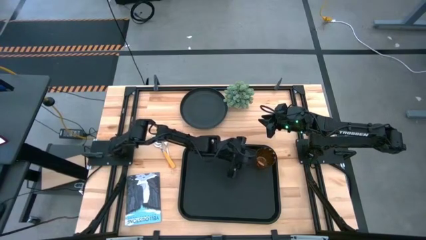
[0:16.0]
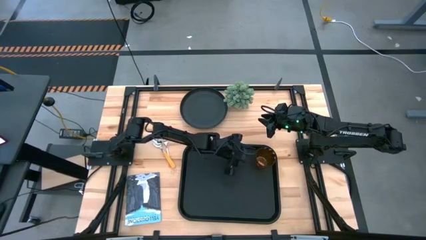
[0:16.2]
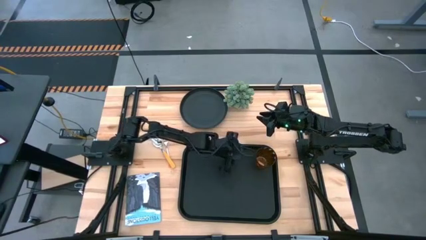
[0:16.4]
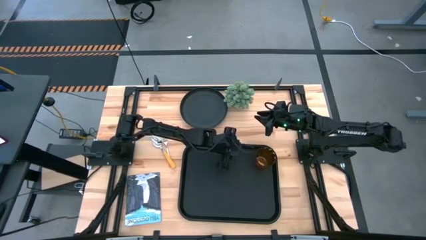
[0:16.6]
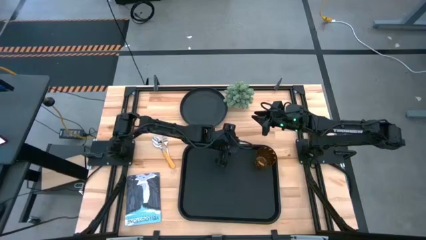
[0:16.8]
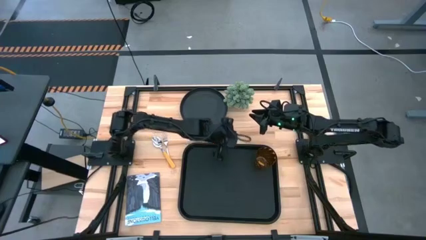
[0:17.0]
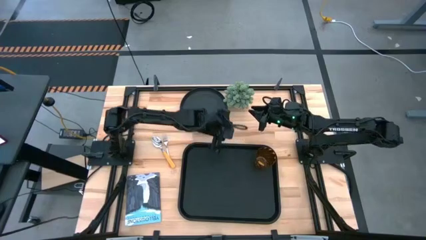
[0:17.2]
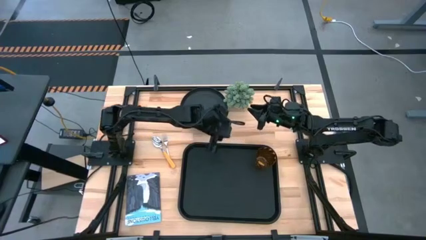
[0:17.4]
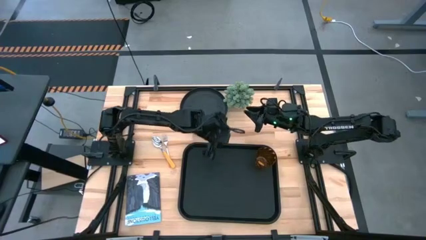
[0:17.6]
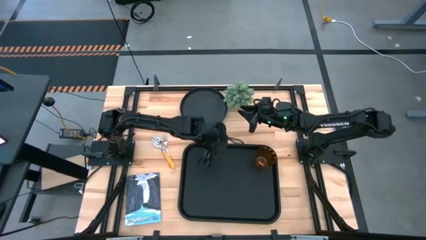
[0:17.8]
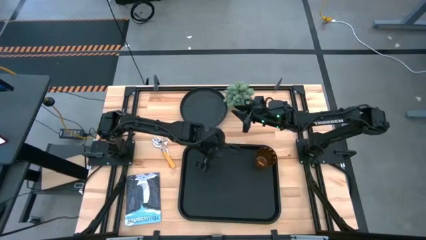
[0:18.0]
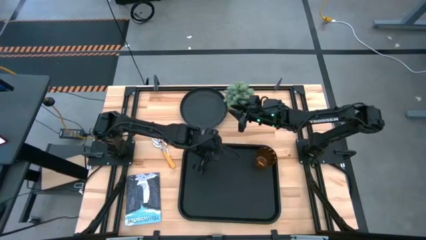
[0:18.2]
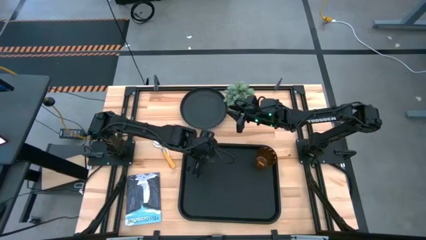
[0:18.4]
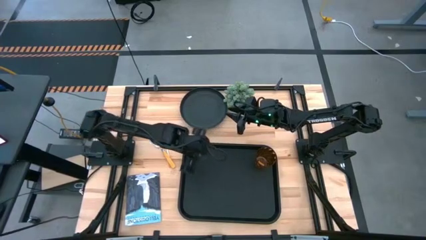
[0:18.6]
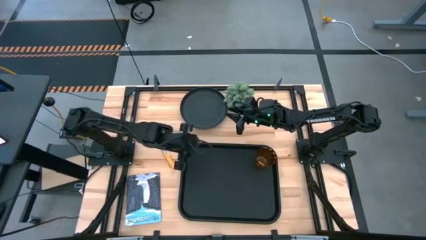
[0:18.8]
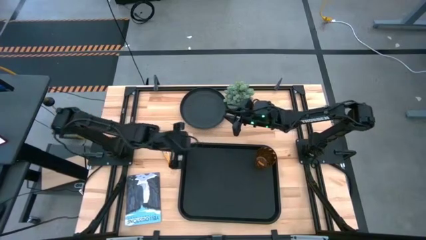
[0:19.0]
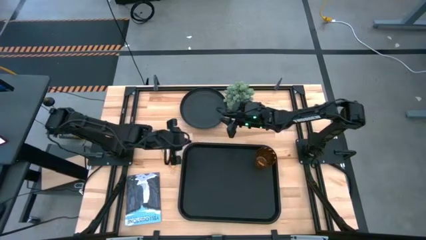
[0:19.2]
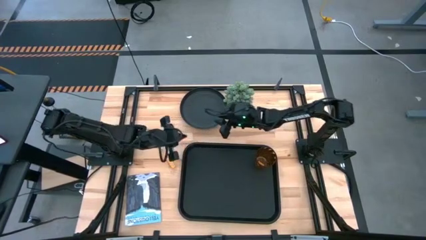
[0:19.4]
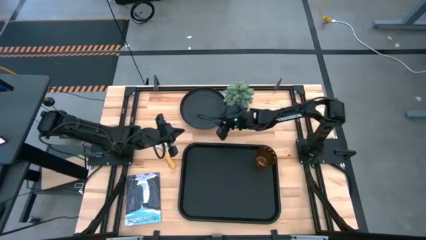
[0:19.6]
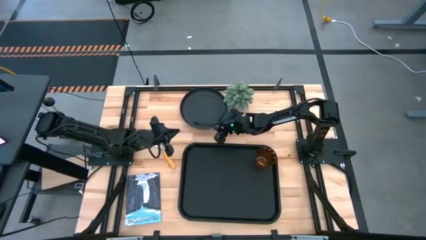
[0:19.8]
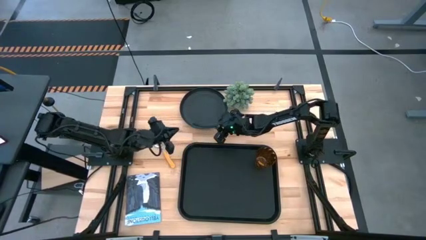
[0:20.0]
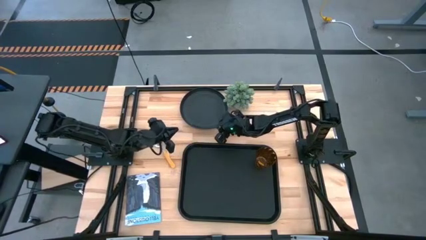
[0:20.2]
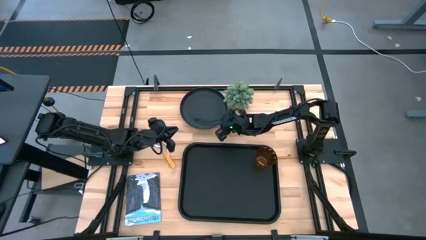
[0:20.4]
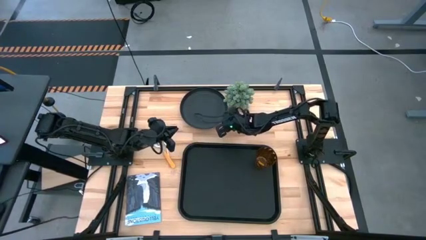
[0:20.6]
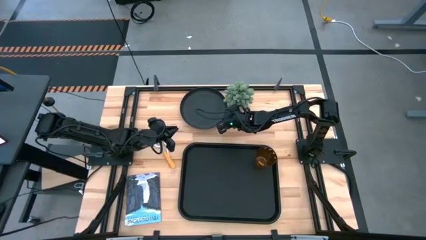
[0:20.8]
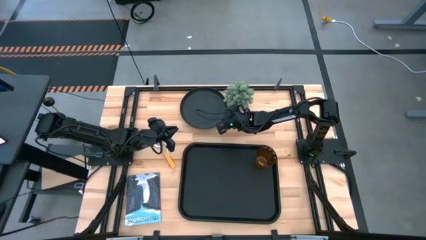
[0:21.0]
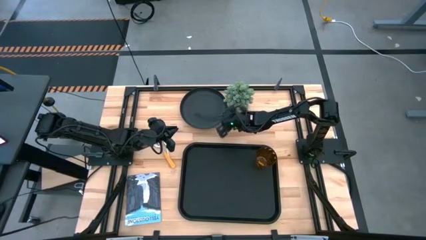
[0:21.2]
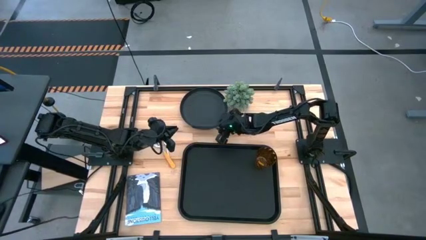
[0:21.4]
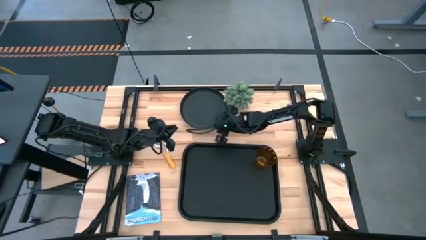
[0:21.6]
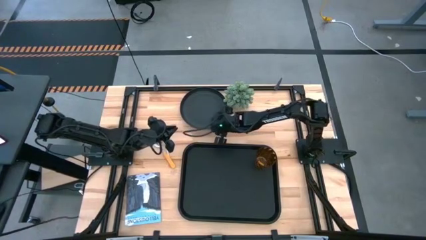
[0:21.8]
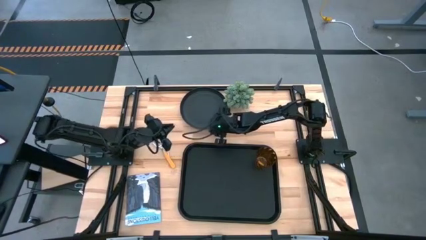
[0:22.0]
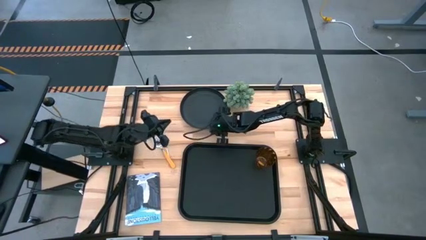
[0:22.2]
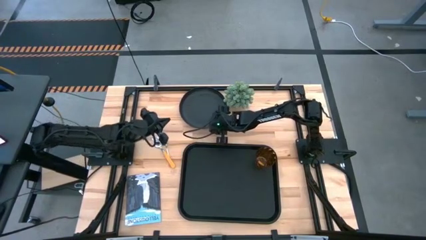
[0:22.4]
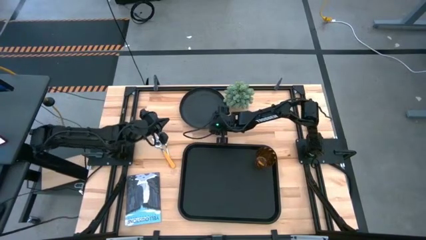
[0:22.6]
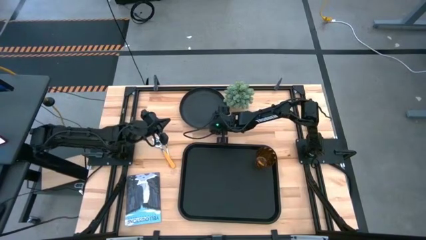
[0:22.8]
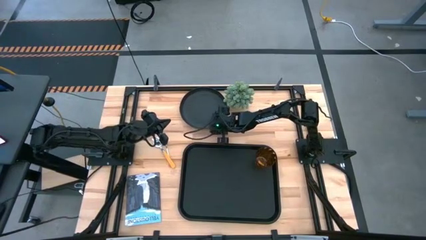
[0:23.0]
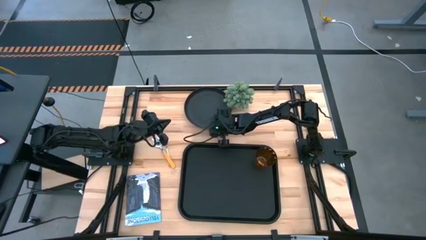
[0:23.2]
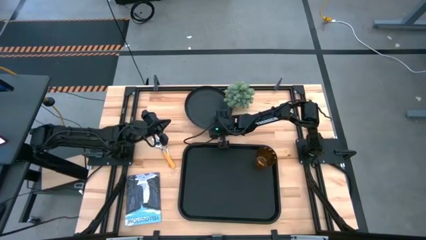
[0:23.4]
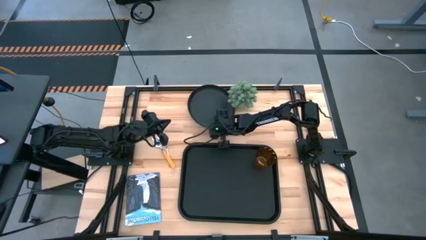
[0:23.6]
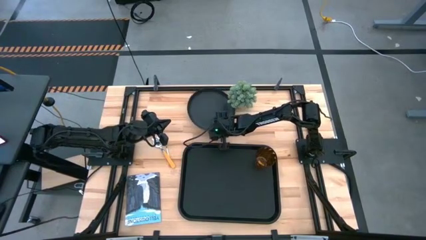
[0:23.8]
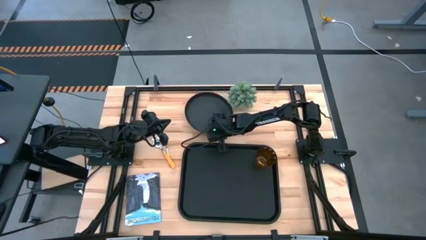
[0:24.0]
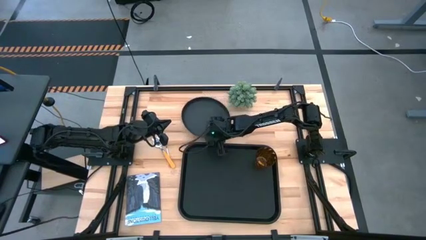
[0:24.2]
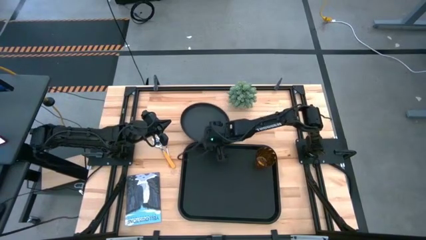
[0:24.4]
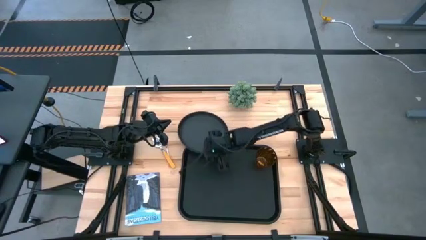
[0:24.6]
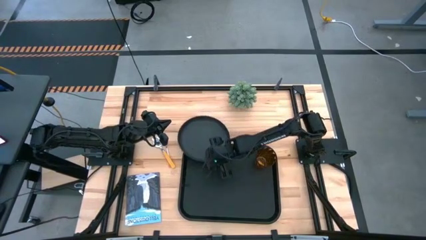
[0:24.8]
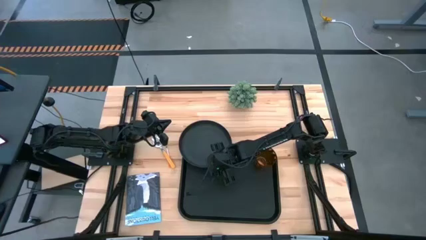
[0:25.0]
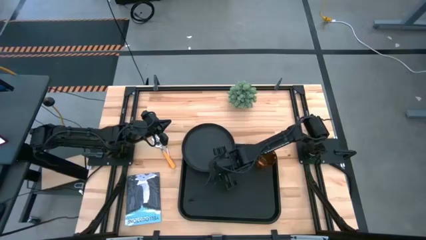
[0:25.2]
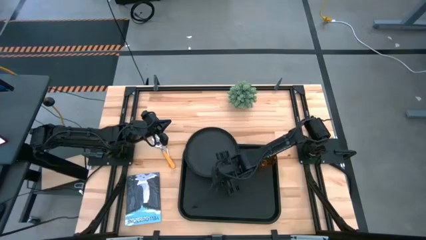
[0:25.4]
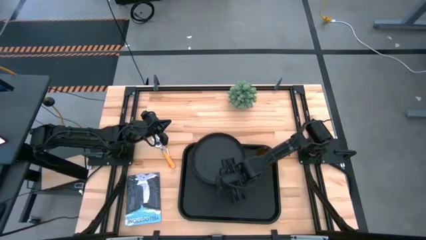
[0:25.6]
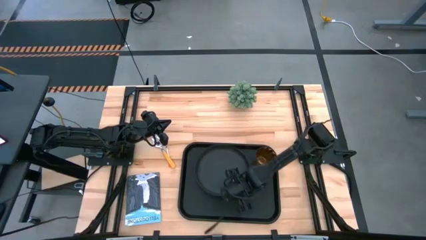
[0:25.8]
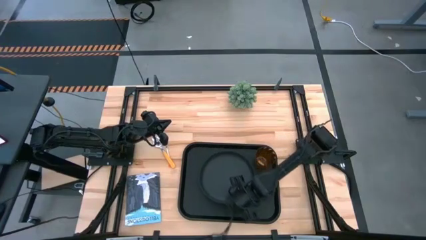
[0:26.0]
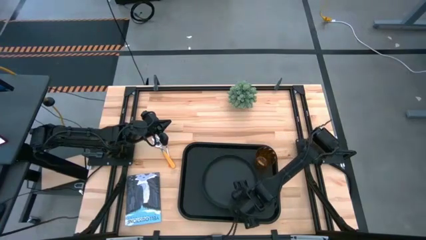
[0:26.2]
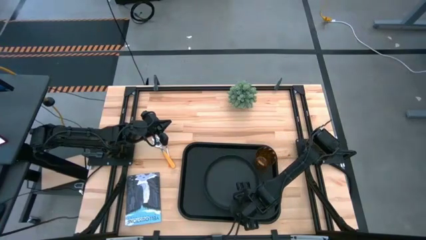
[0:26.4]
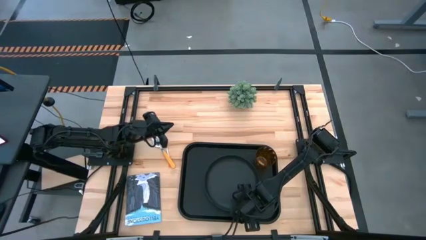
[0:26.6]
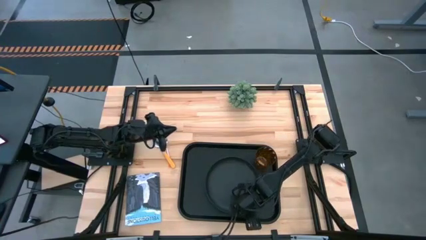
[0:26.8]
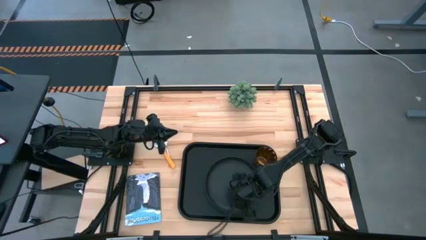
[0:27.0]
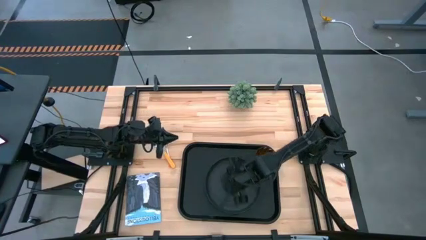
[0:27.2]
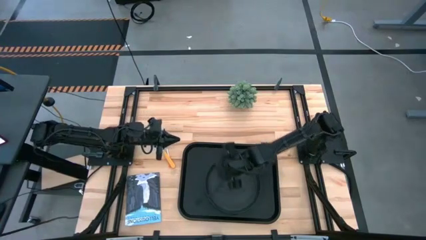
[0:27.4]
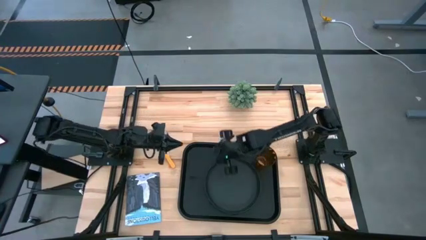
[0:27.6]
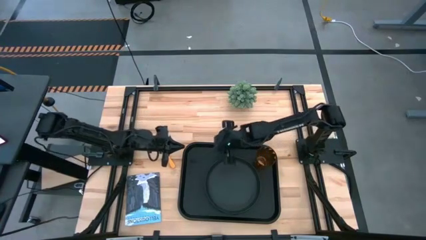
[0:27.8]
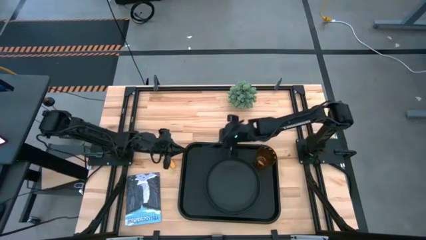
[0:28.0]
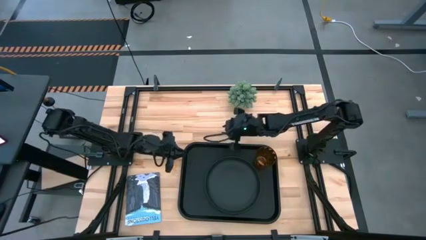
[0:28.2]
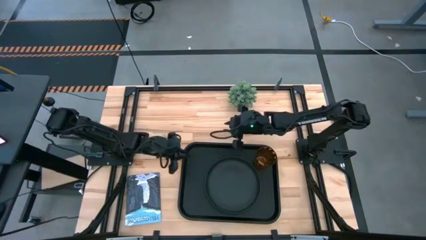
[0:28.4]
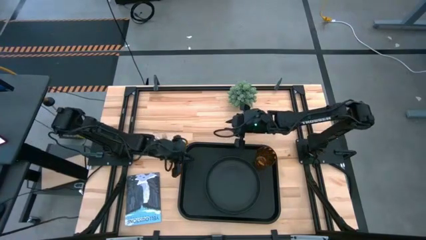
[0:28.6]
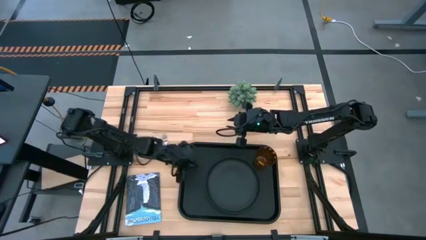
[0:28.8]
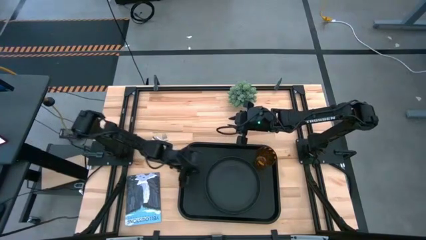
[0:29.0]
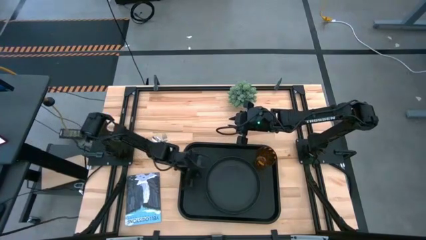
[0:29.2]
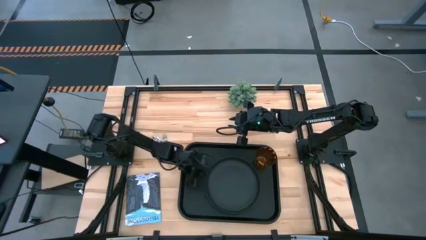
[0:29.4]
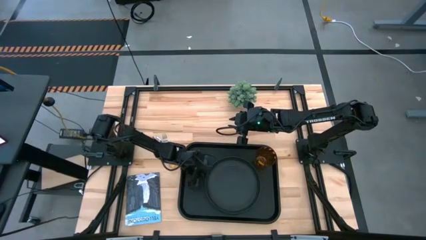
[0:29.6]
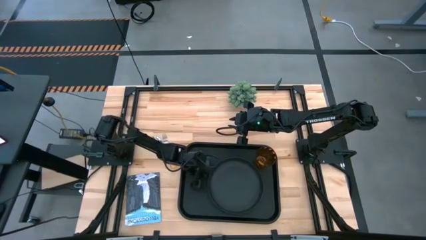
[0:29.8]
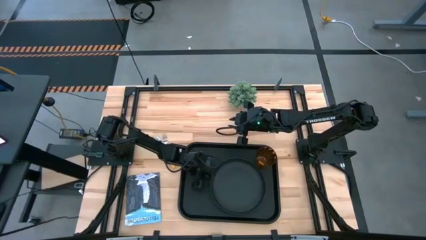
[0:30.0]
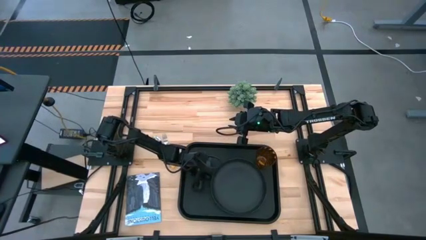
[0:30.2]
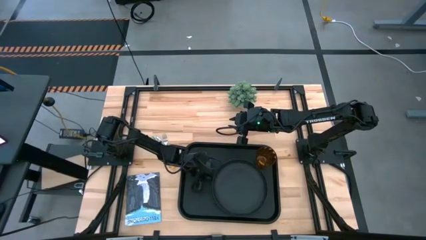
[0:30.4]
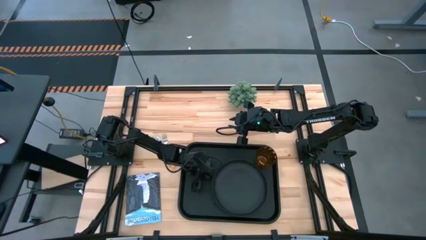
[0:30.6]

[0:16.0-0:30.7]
Task: Pick and place plate/cup/fork/spoon on tray
Put the black plate on the black tray to the bottom right of the orange cup
